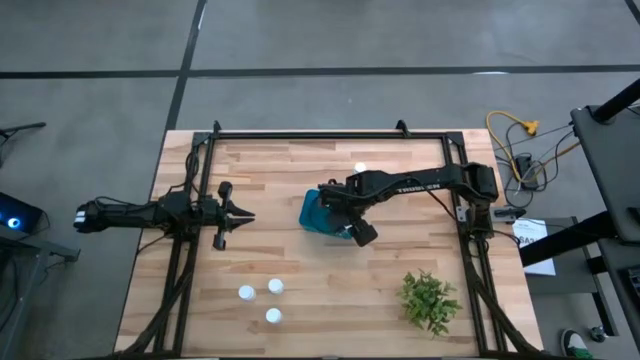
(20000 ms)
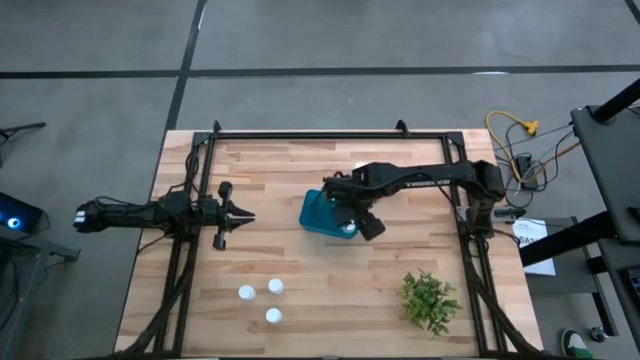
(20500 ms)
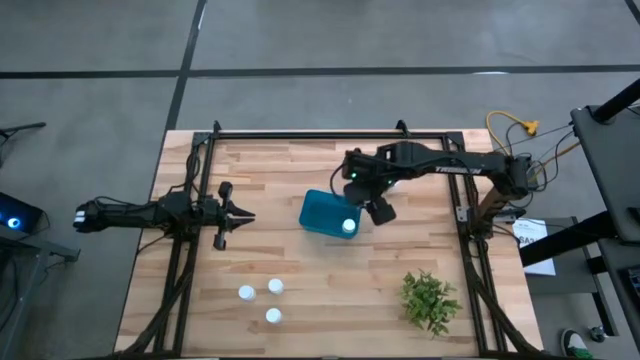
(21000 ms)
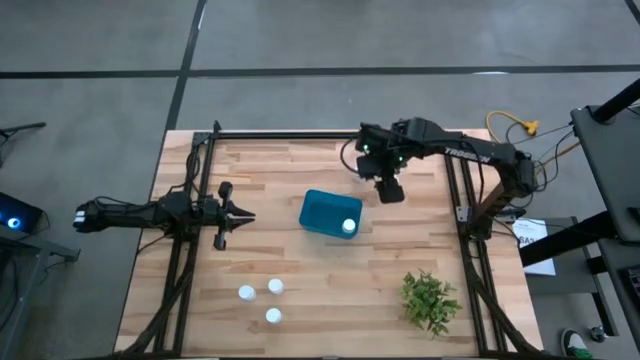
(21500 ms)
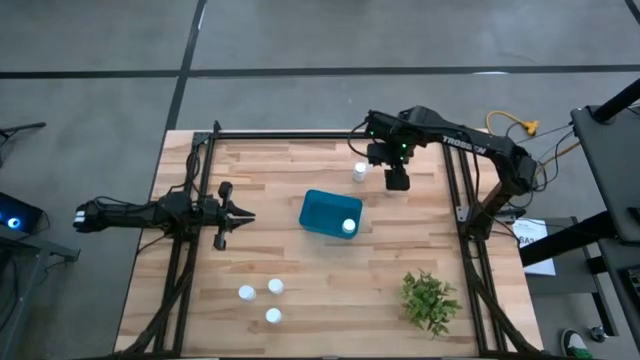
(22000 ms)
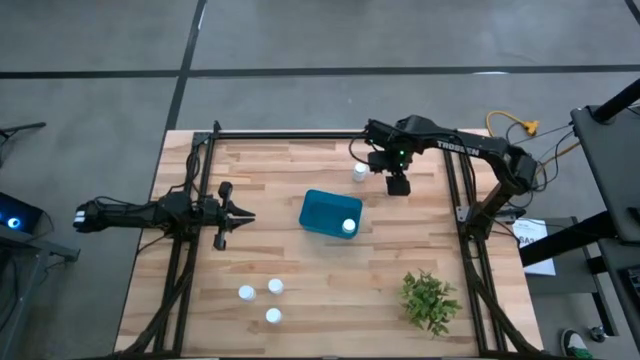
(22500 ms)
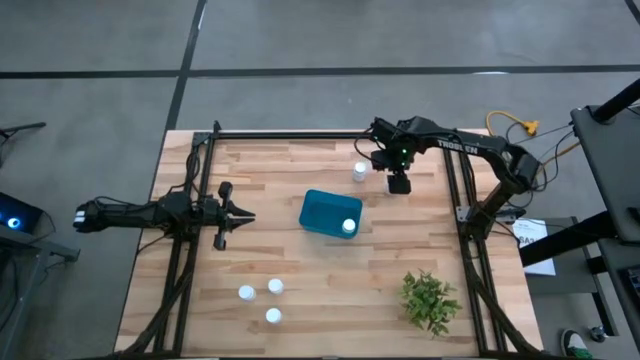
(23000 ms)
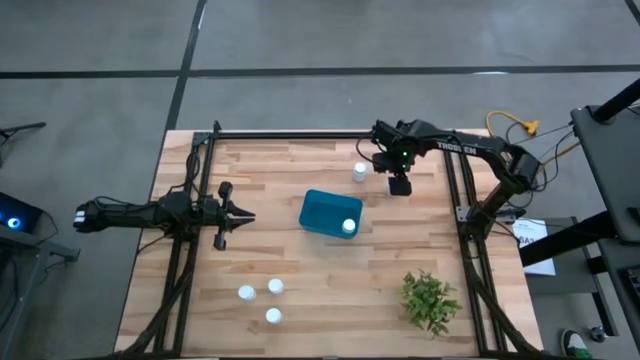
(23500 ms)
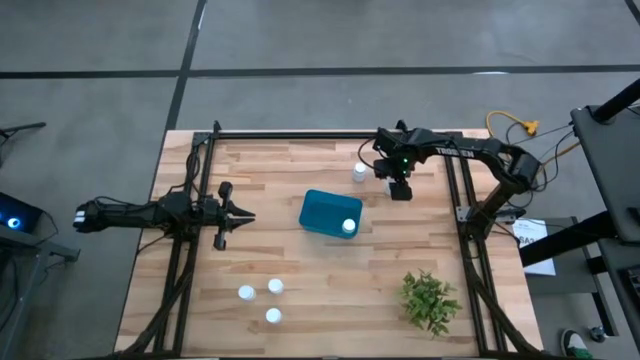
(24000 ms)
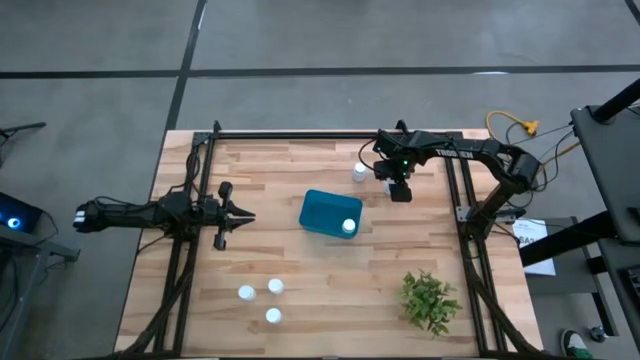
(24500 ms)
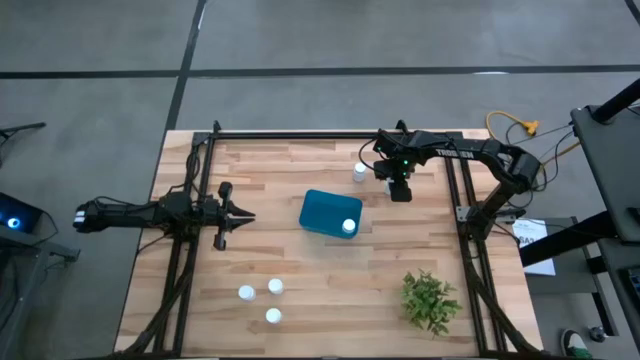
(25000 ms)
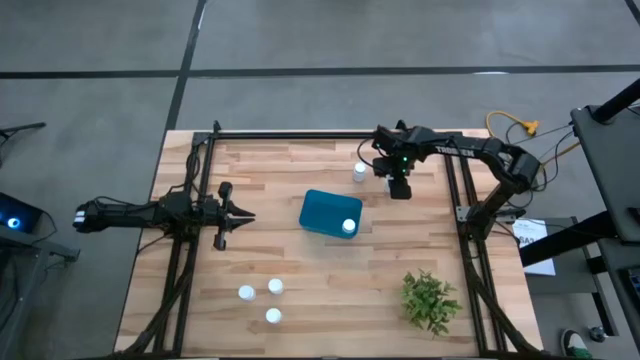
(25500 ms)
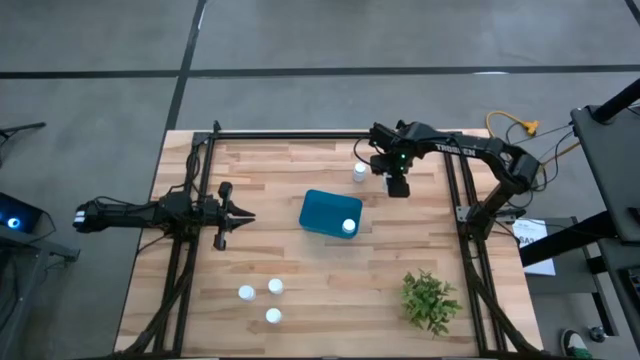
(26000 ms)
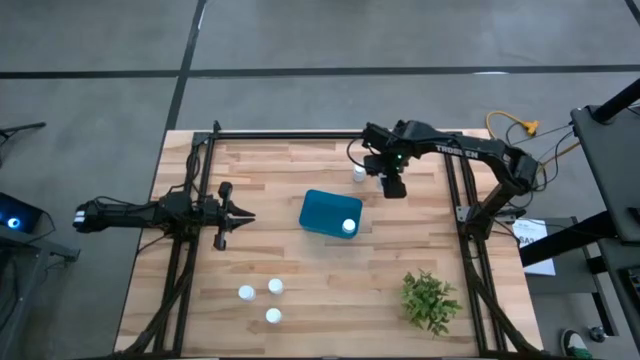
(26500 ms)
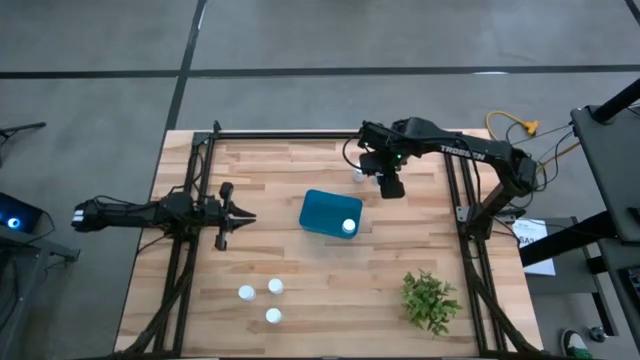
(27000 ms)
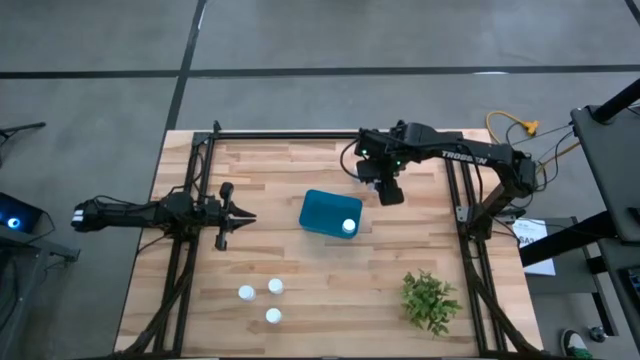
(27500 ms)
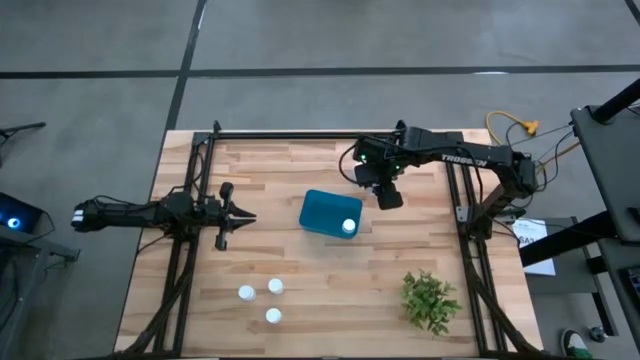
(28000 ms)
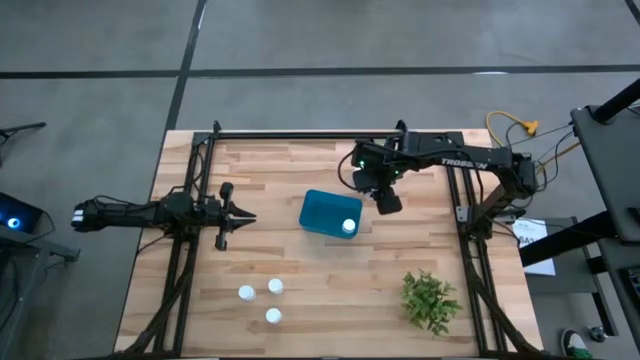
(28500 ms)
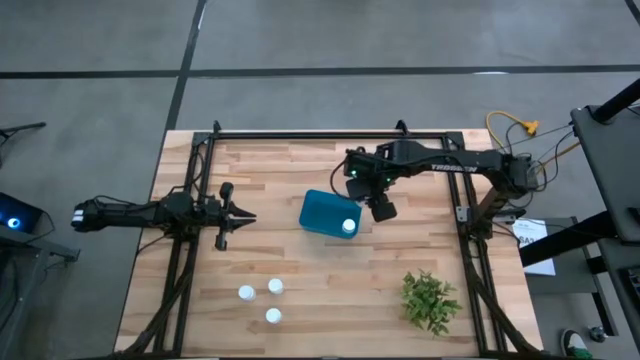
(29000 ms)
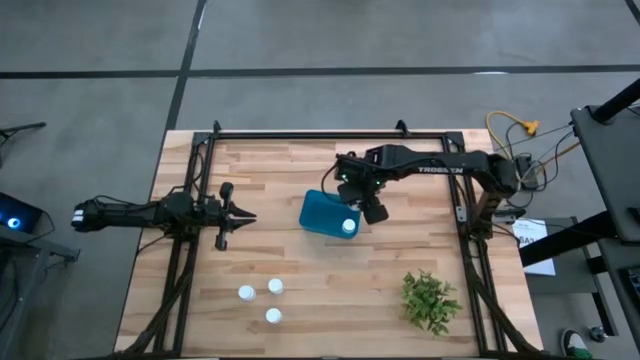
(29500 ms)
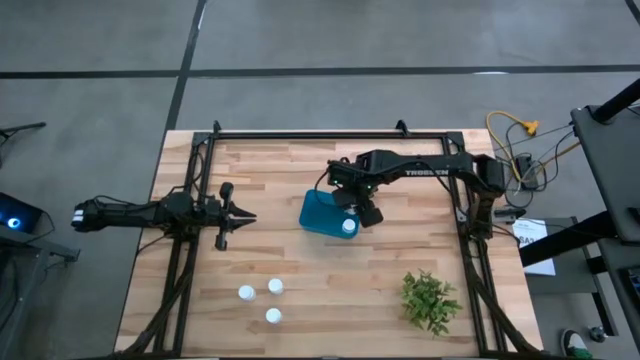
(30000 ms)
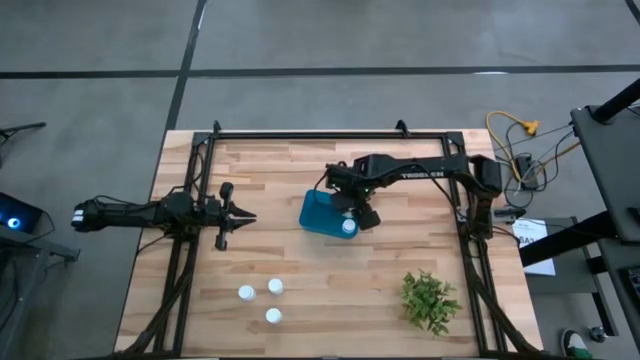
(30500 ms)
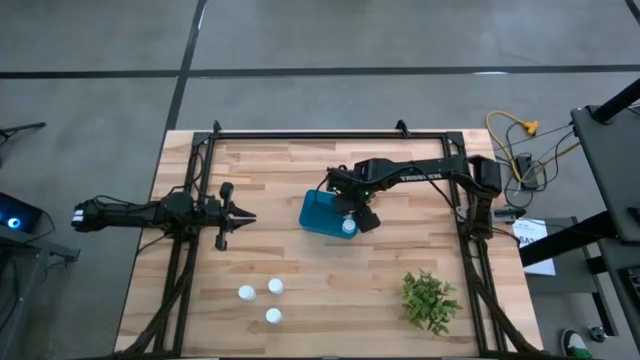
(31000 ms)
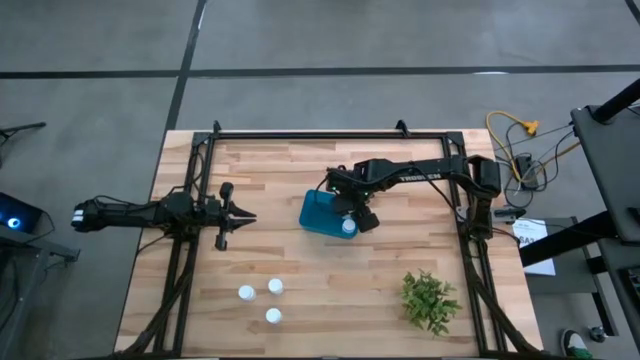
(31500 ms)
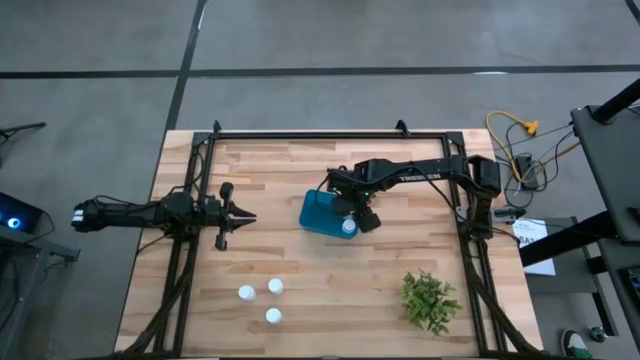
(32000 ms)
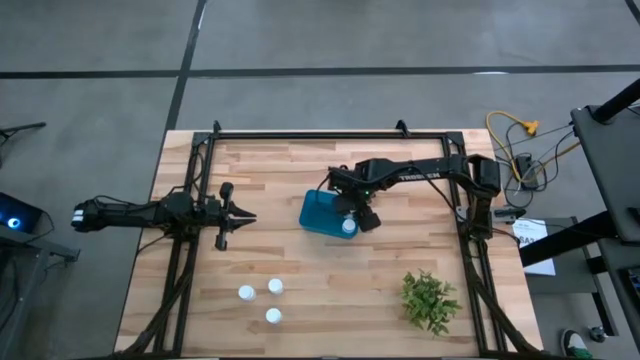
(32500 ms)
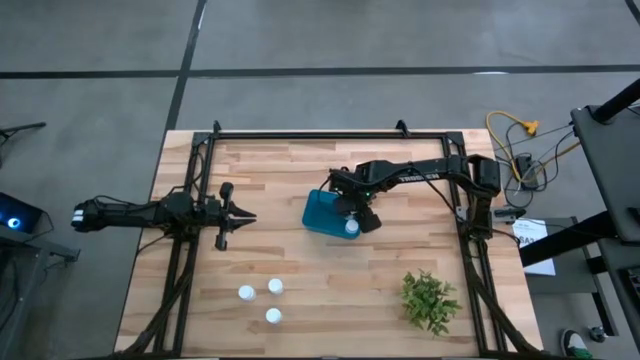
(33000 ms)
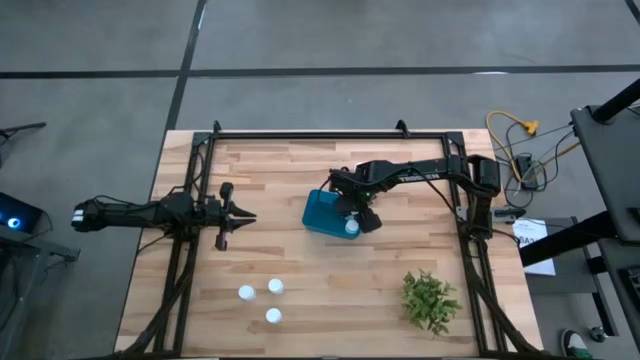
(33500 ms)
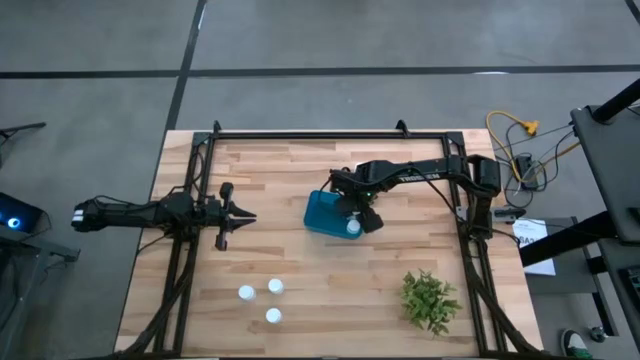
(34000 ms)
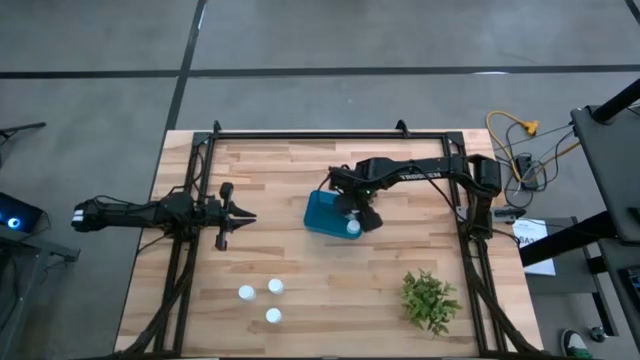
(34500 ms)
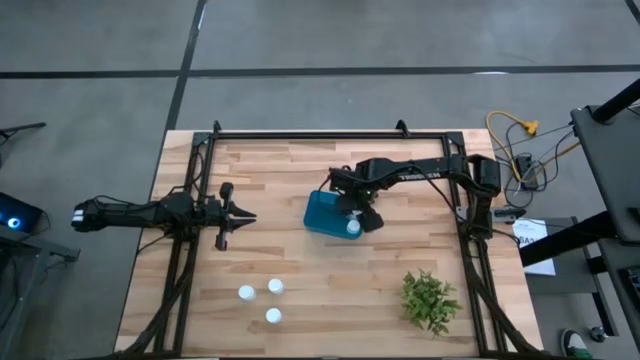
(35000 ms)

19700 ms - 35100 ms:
Task: Pick and place pill bottles into a basket
Put the white pill bottle into the blue bin
